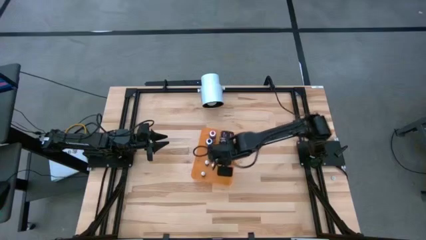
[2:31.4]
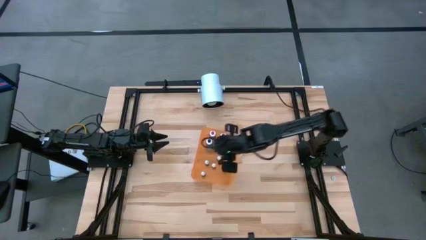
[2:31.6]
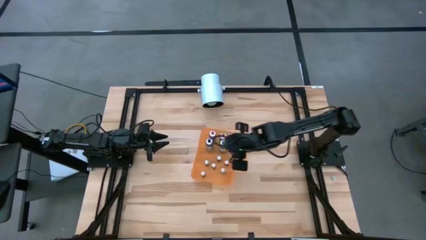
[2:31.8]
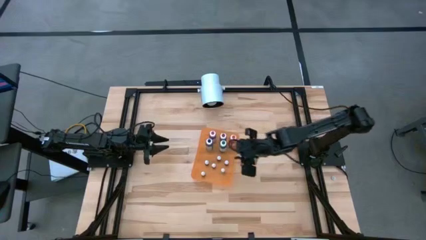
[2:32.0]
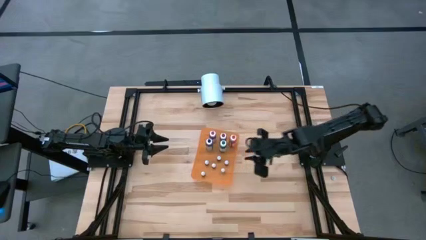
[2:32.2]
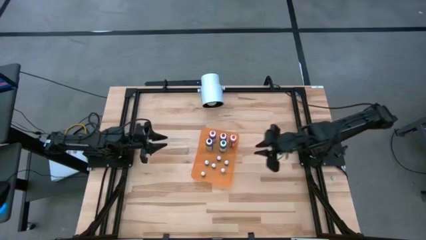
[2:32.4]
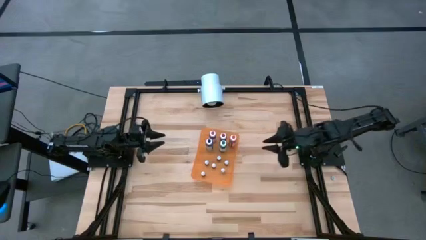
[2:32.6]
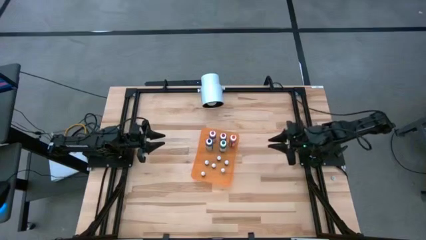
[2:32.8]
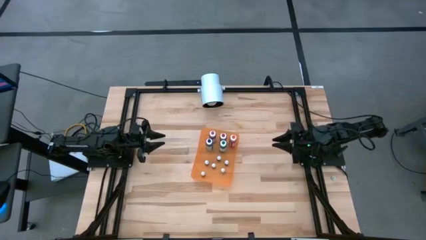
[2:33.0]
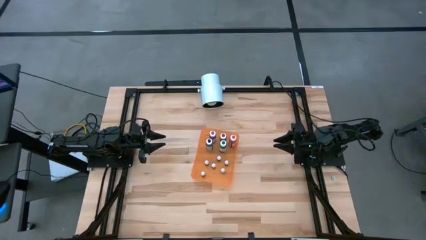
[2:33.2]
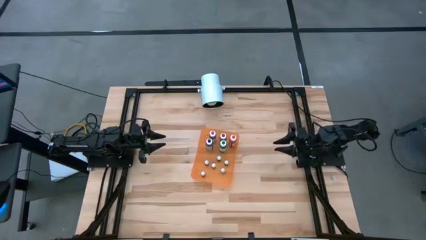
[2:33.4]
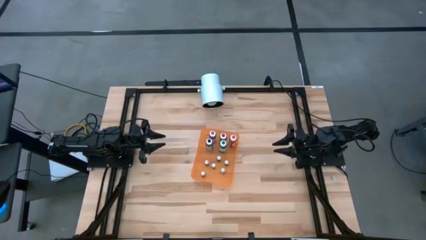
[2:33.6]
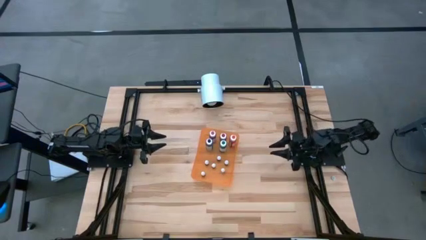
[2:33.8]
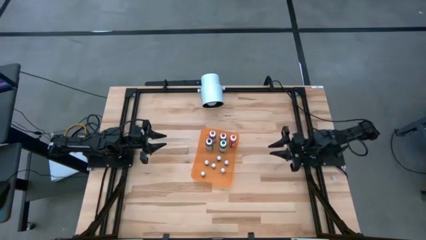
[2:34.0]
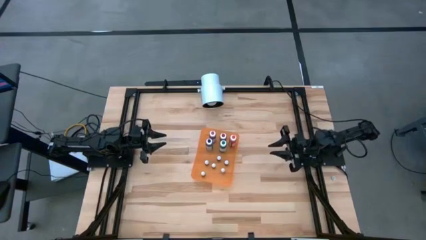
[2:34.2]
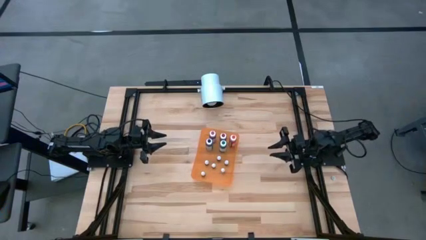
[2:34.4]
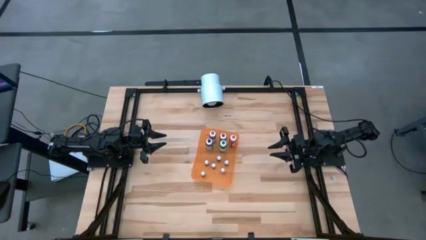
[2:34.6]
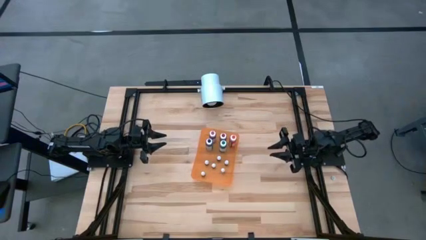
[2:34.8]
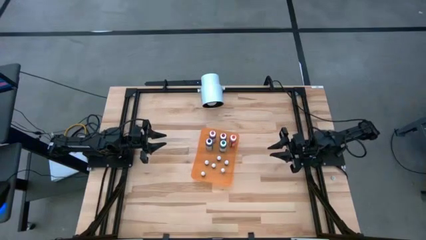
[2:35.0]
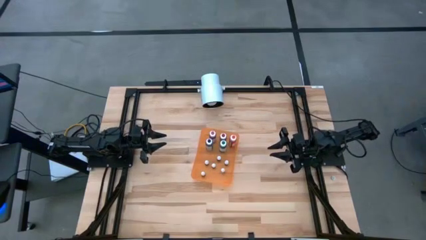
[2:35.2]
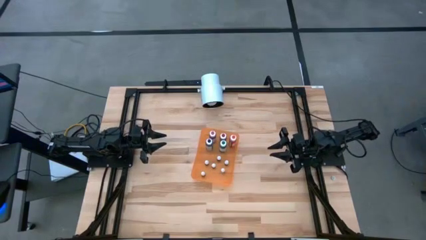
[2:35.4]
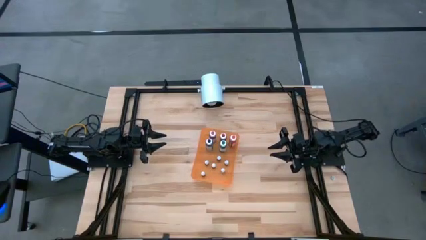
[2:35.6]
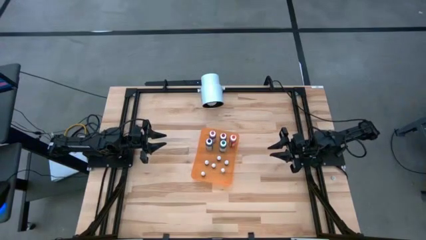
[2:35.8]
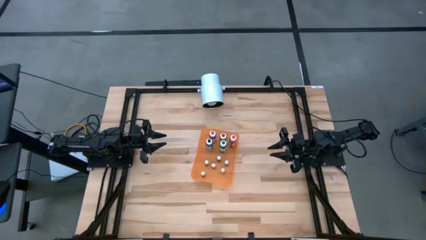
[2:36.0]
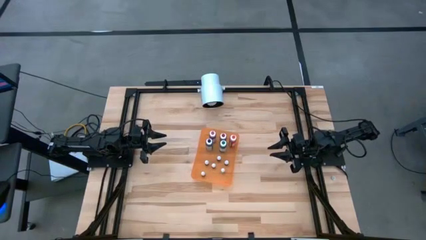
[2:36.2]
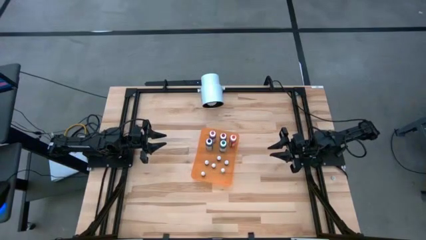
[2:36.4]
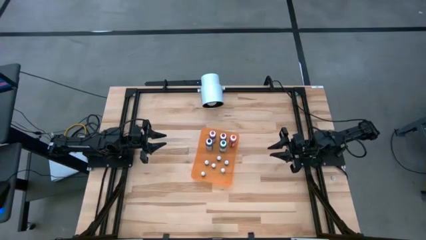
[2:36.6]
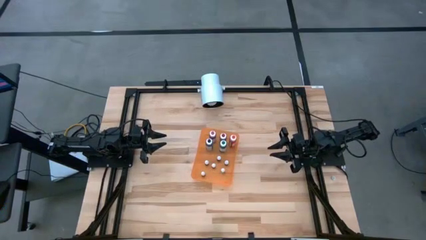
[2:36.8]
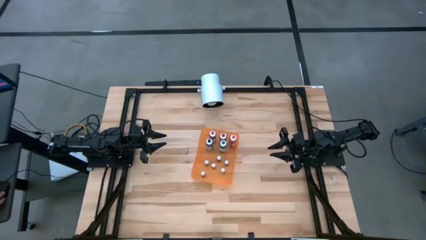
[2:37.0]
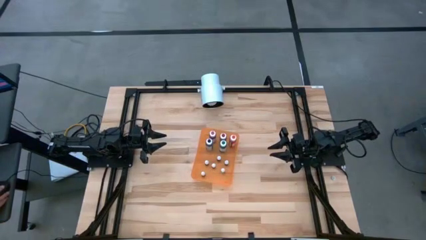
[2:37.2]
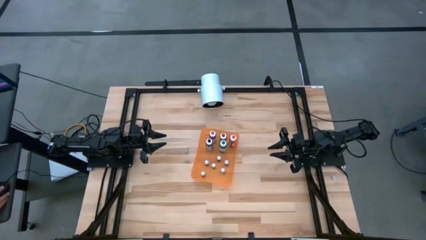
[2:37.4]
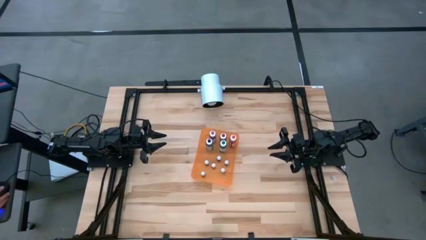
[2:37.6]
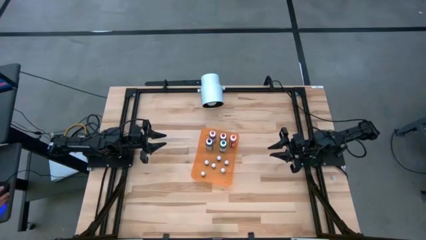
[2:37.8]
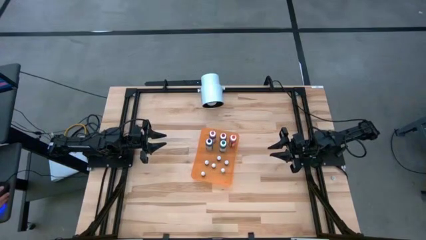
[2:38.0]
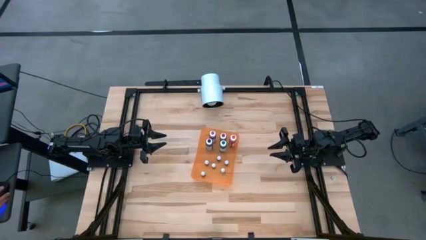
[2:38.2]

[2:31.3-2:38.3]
Task: Pick & Place food coloring
Return to Home Position

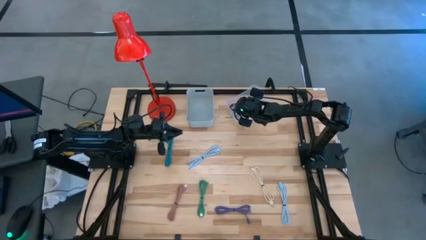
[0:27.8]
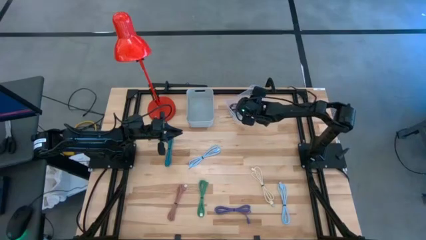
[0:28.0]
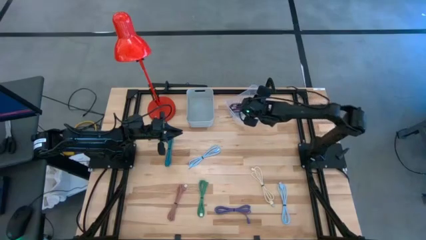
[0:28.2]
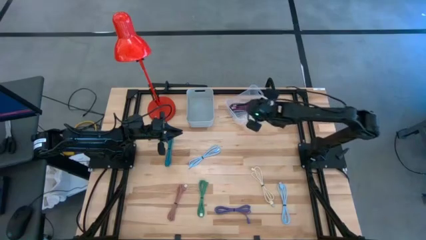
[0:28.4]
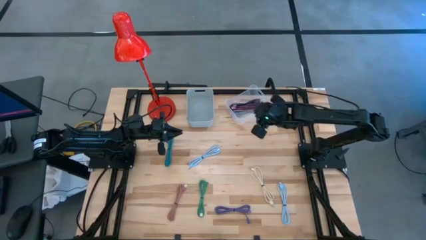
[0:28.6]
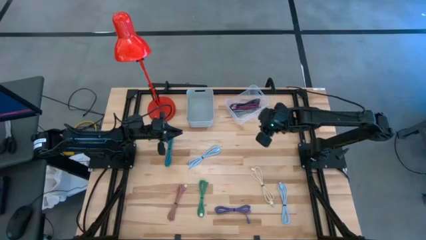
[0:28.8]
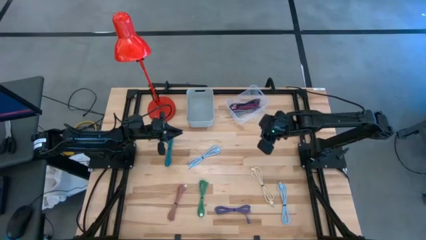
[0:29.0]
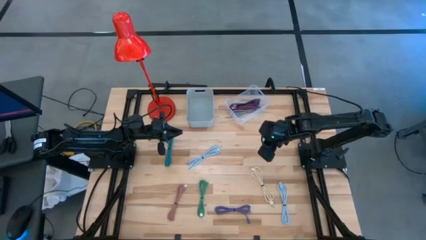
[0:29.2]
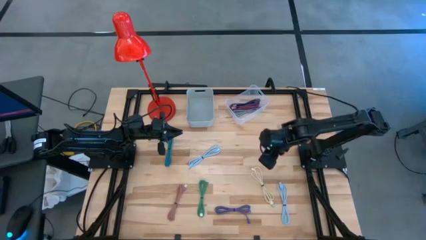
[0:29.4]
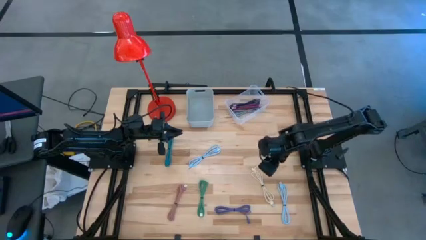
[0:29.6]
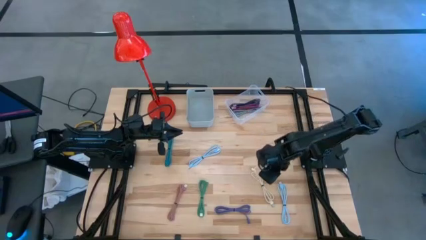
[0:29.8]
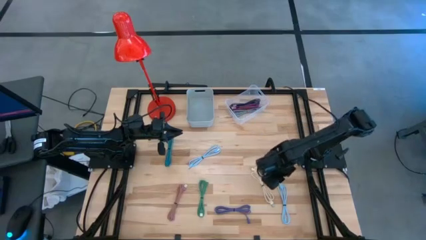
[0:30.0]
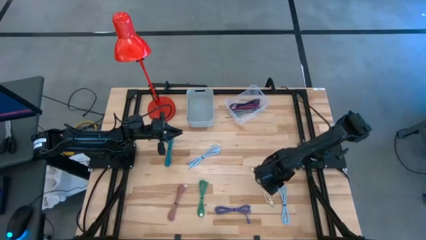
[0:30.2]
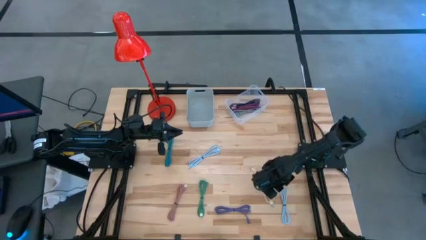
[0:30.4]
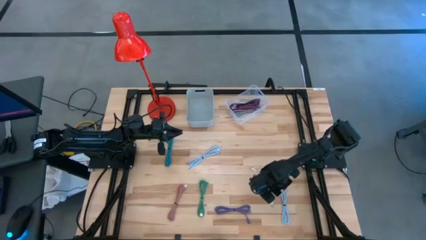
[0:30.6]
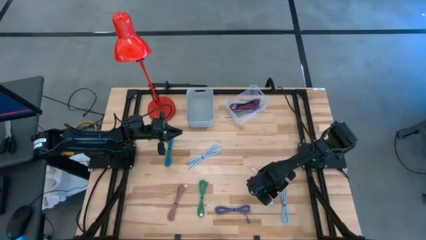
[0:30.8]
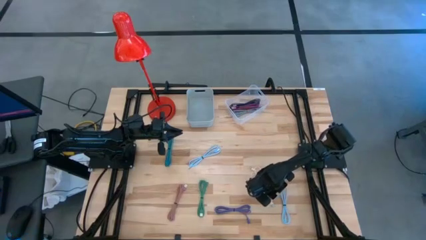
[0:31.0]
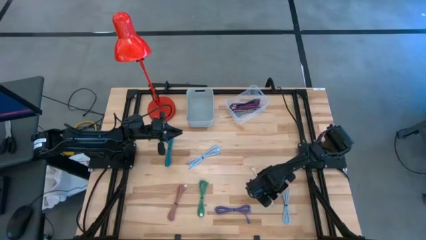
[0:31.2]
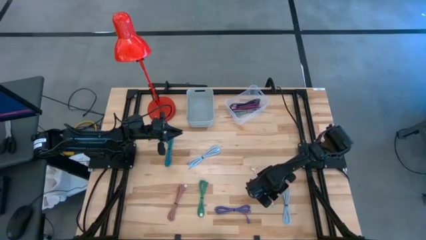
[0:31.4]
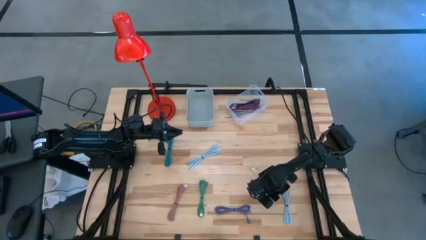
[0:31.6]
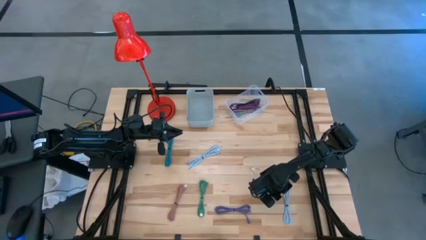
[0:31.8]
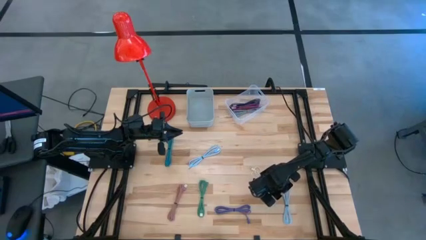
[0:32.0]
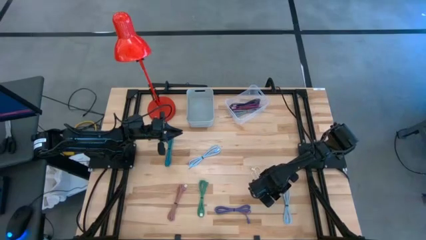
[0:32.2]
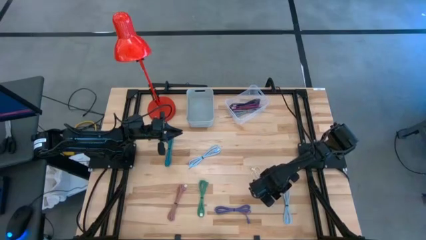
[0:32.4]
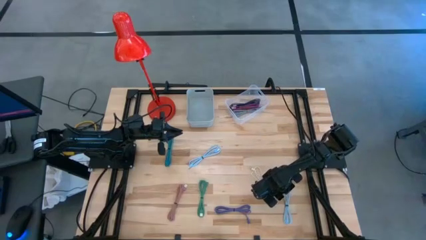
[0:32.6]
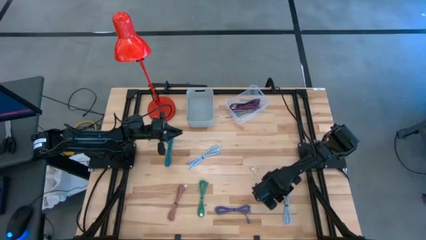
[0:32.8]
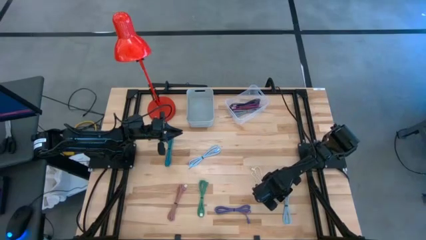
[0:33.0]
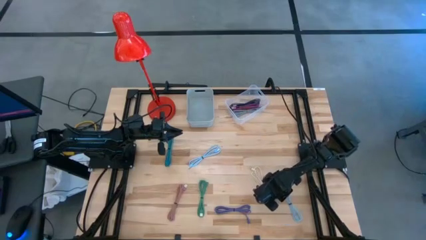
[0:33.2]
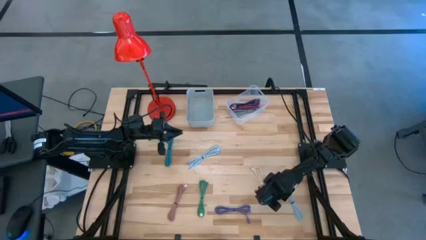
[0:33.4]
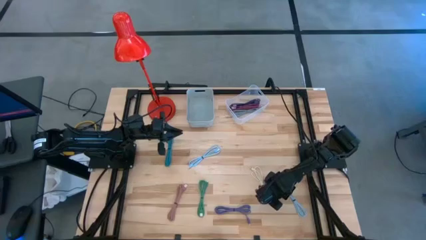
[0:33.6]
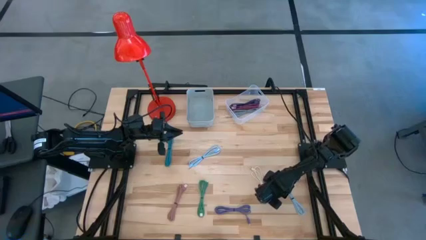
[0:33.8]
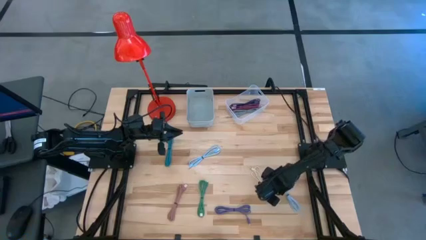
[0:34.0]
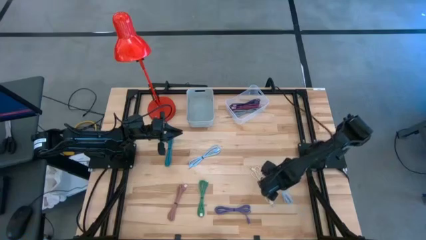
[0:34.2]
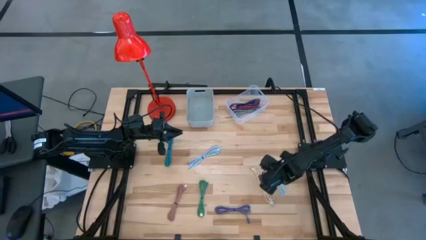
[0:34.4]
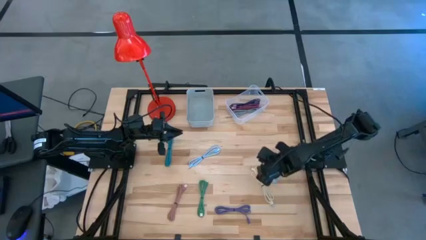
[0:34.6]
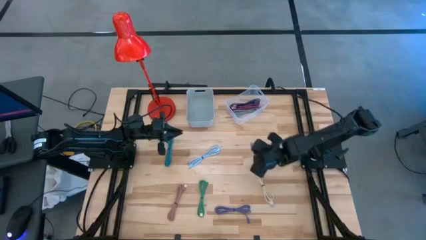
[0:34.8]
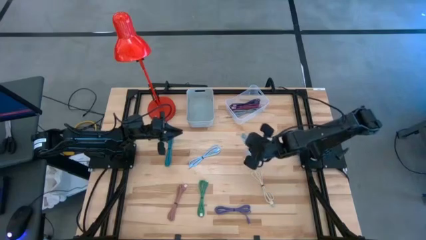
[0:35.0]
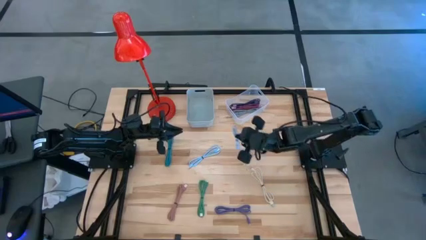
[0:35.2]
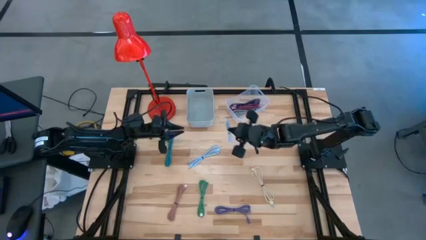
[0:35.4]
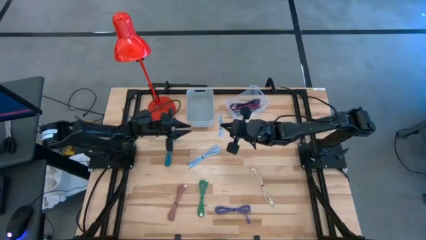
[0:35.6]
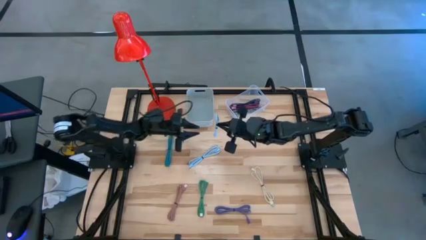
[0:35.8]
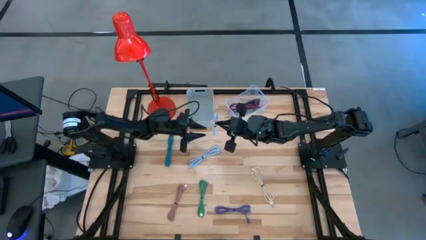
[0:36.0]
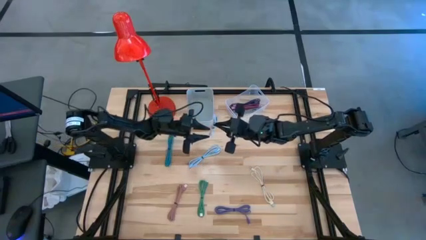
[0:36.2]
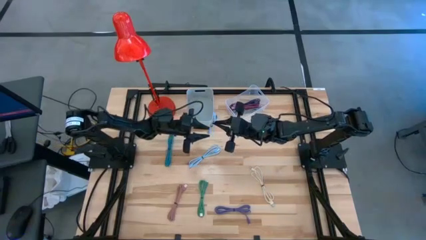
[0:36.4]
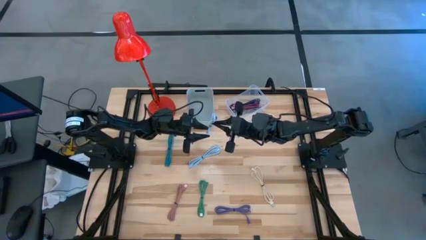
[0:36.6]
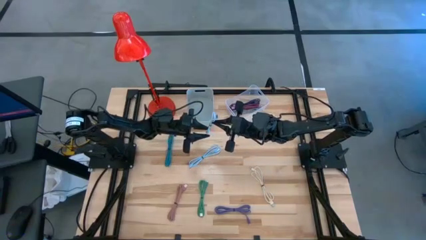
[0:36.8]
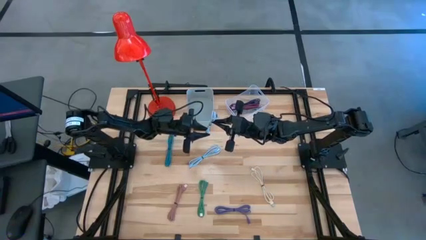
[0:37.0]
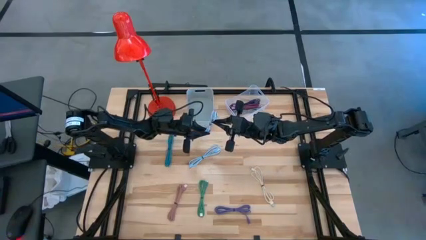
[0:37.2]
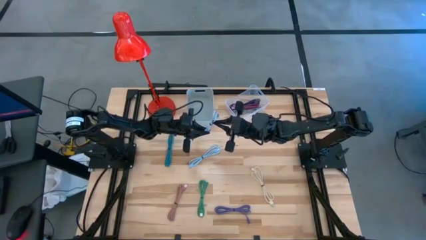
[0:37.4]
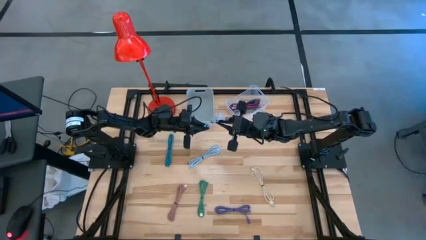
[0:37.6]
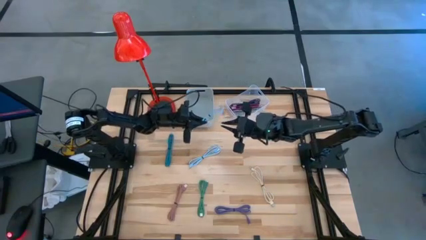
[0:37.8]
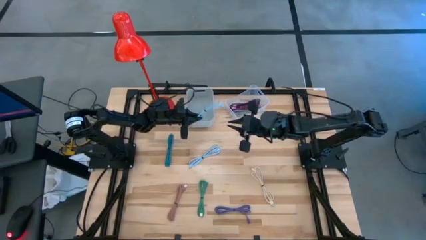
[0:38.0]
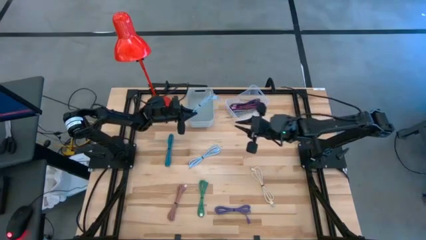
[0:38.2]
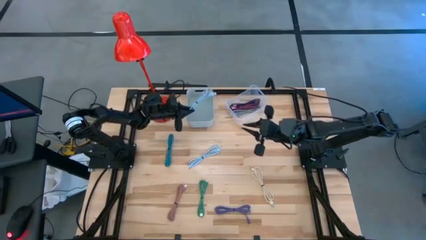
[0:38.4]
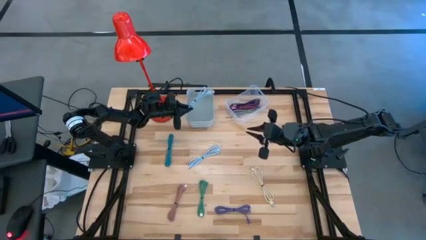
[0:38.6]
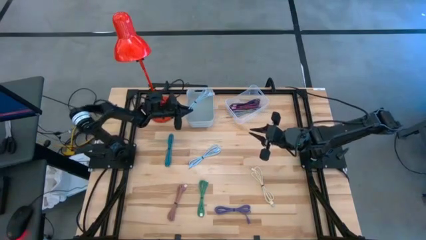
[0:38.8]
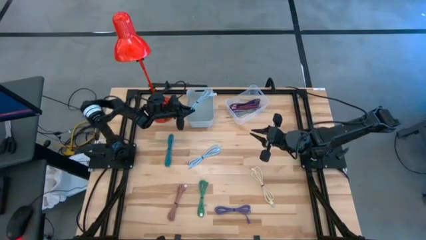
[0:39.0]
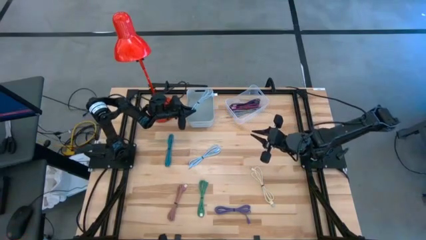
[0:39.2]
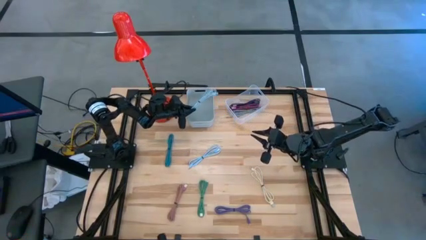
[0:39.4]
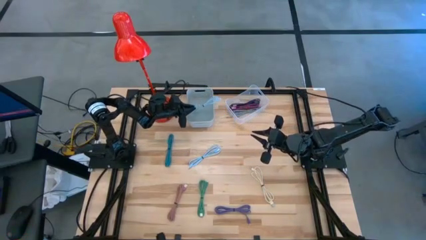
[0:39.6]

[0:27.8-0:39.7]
Task: Pick & Place USB Port
Put the bottom white charger cable into the gray bin
